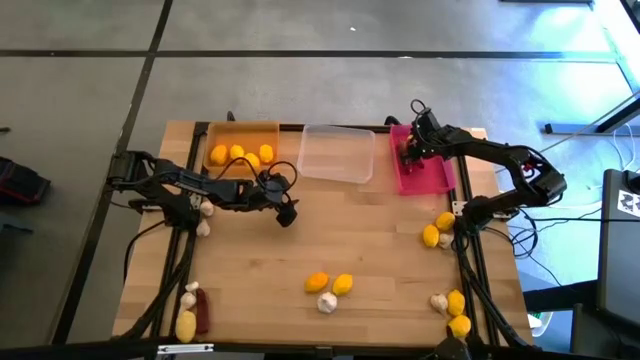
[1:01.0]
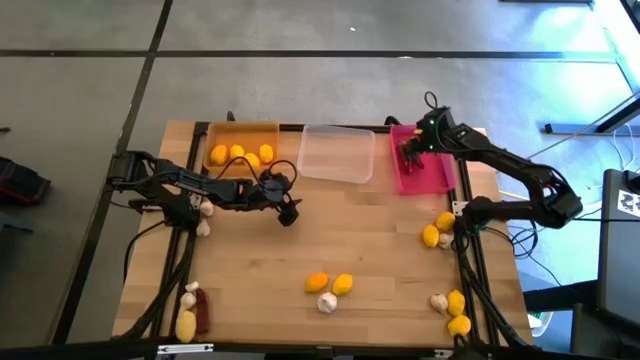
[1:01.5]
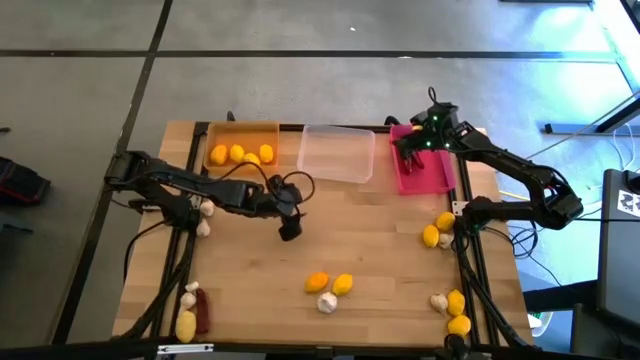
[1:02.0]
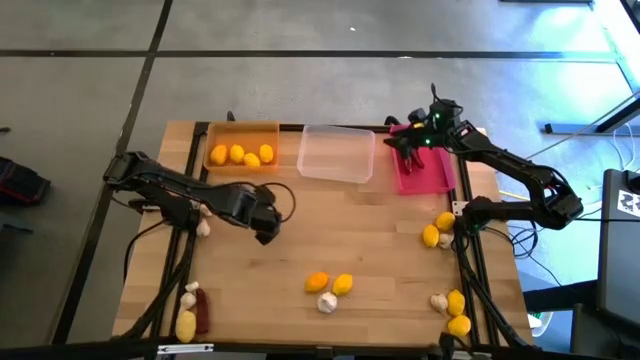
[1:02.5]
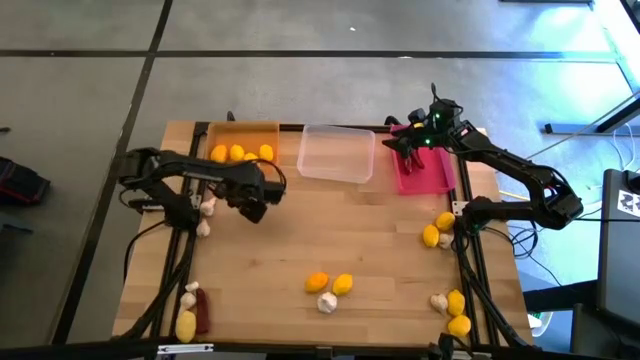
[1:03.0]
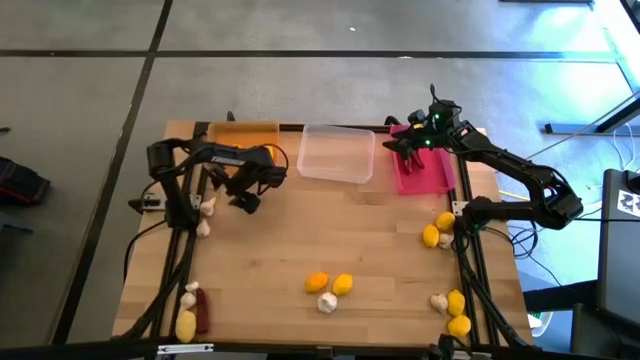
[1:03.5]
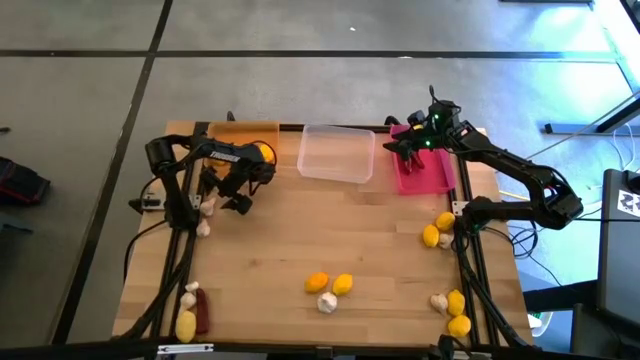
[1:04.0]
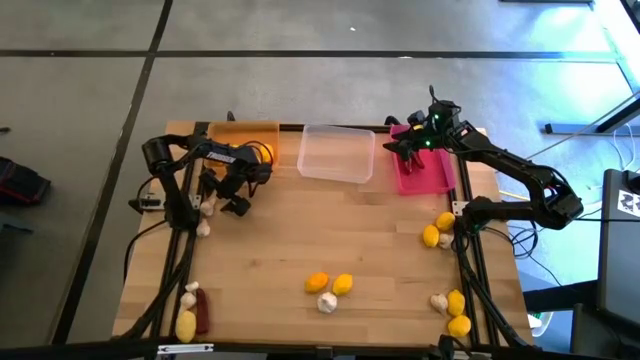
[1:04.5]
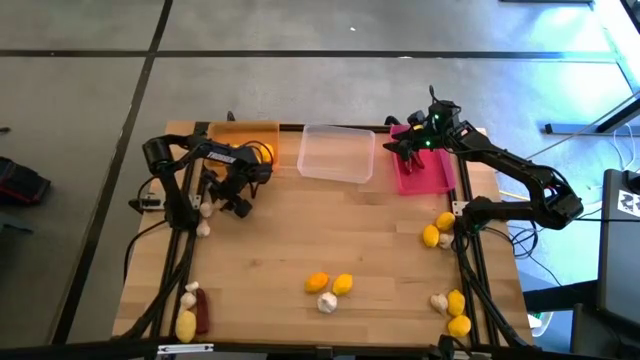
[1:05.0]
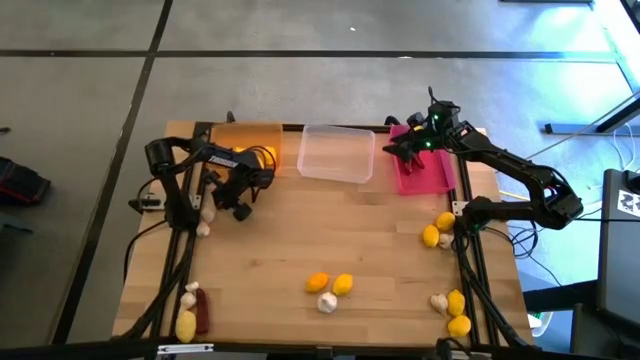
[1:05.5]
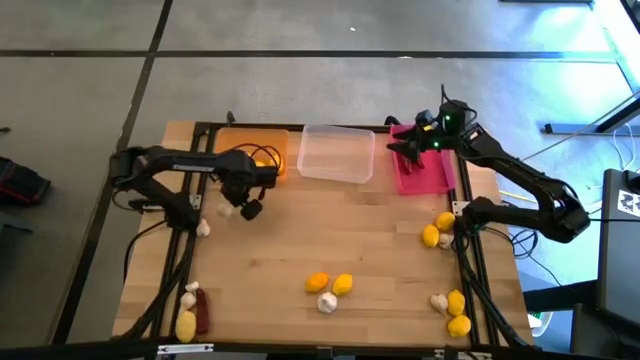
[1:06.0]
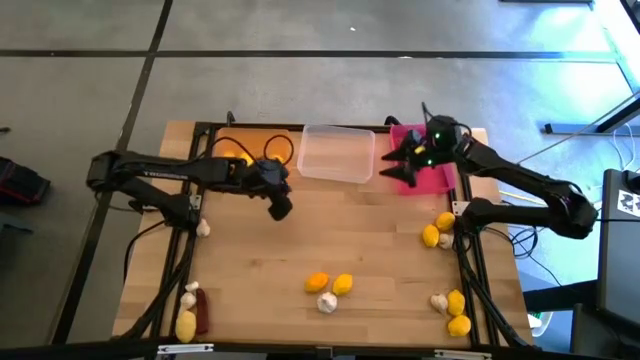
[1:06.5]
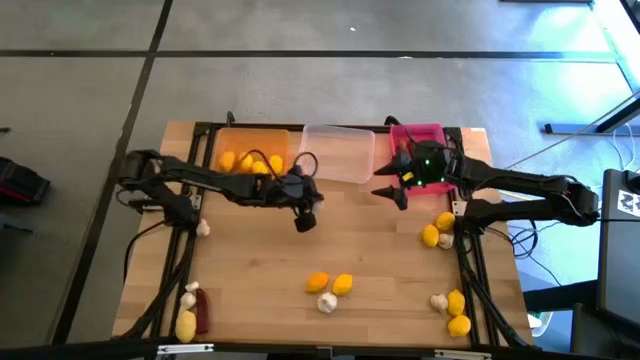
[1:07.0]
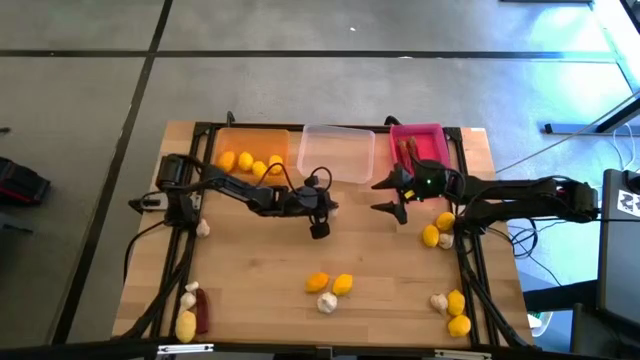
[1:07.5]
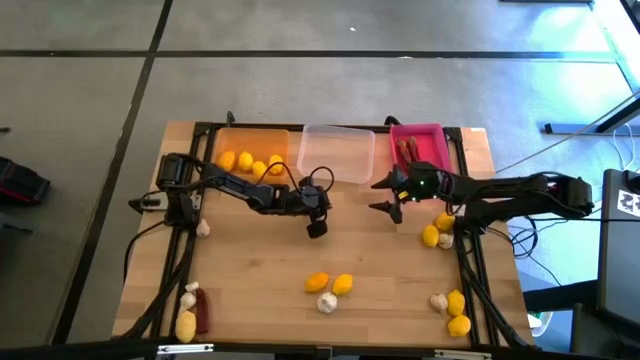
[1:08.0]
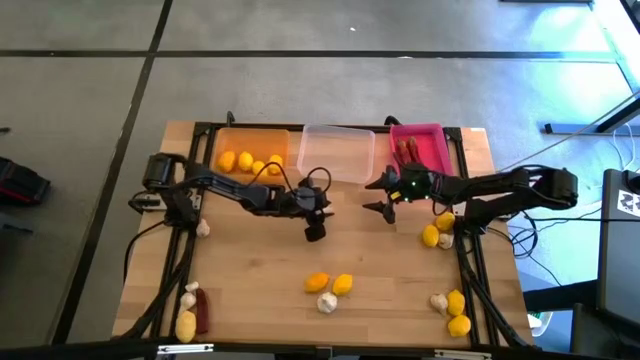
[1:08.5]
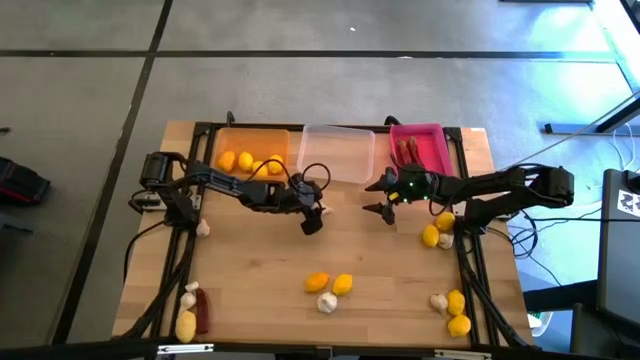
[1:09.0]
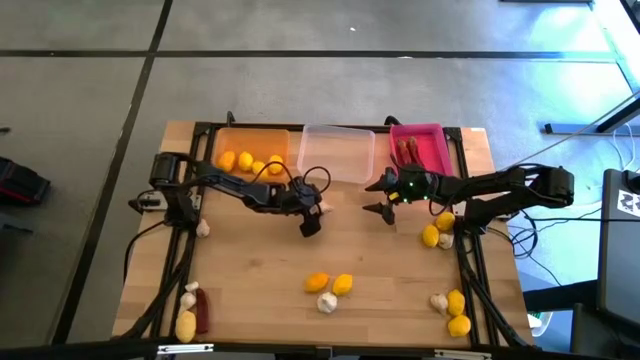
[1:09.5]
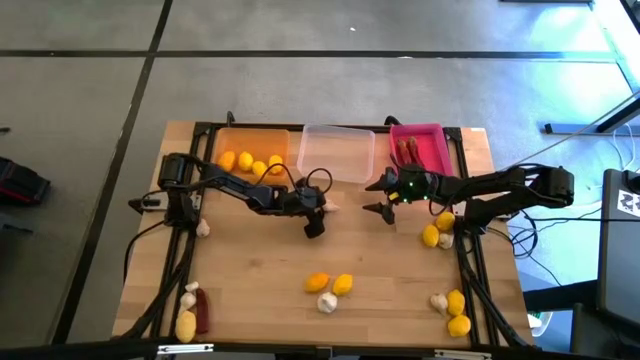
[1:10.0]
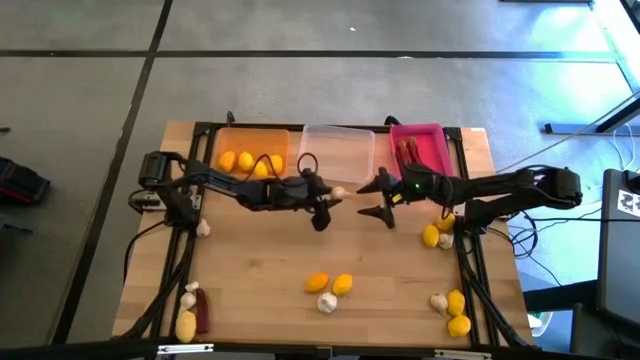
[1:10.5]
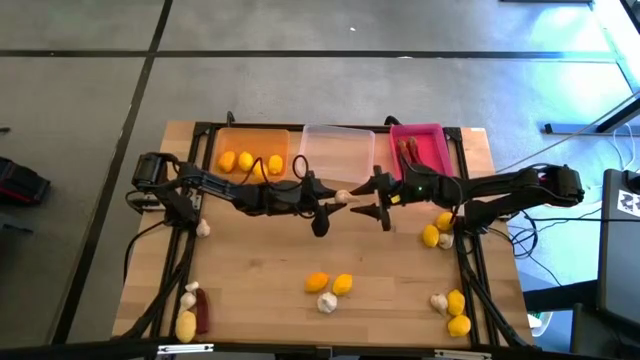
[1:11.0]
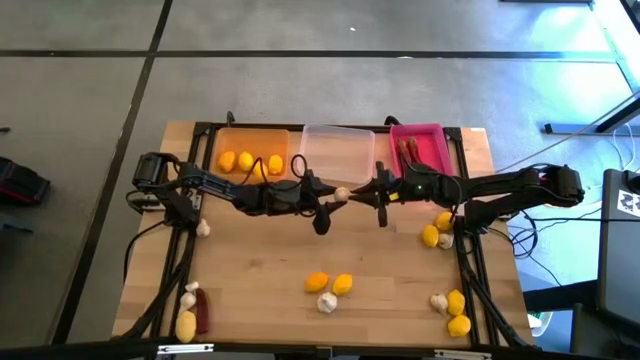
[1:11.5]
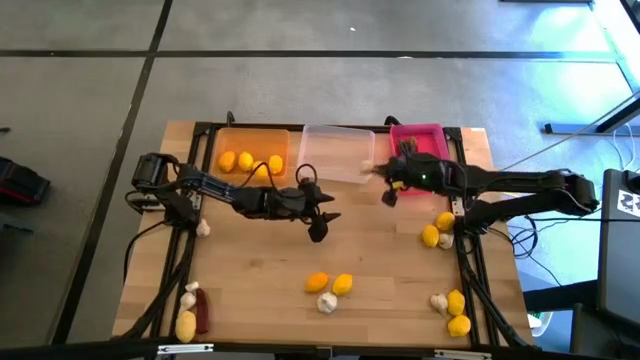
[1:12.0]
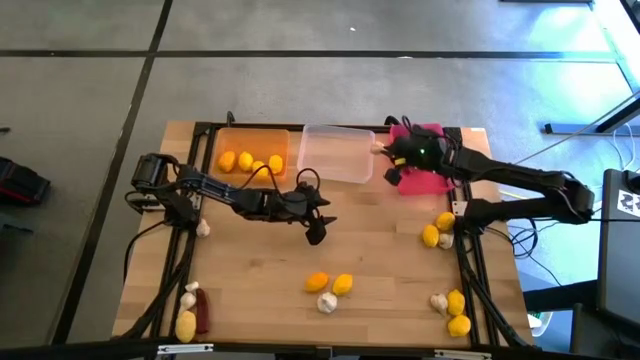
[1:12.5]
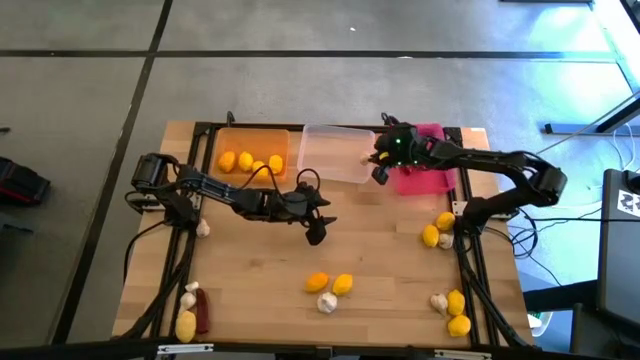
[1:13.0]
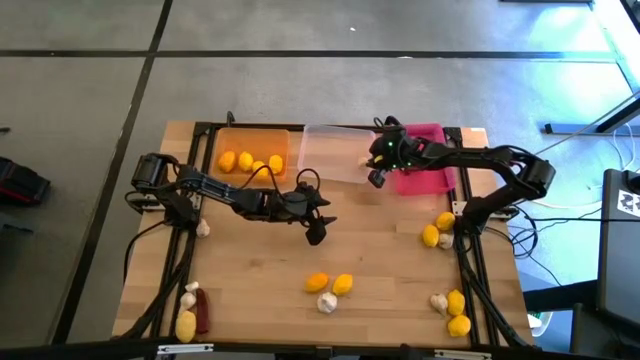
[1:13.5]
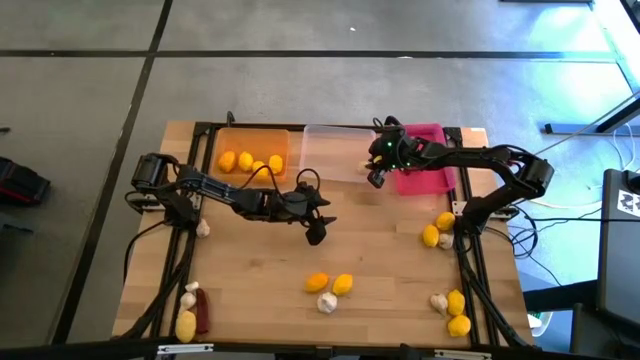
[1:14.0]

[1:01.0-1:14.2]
Task: Sort produce into baskets
Put the white garlic into the transparent bin

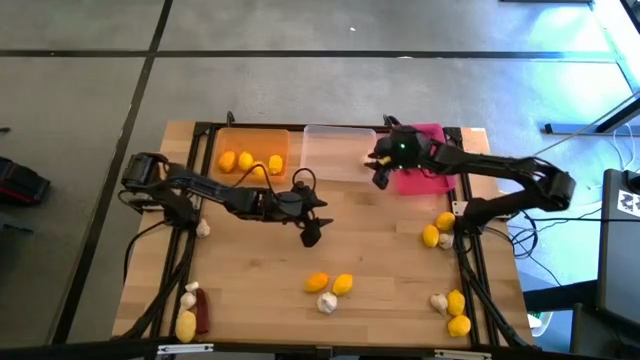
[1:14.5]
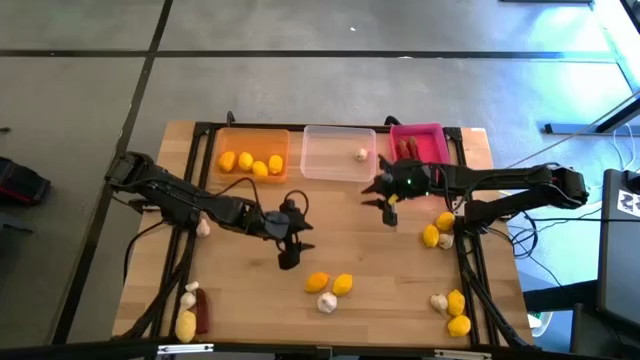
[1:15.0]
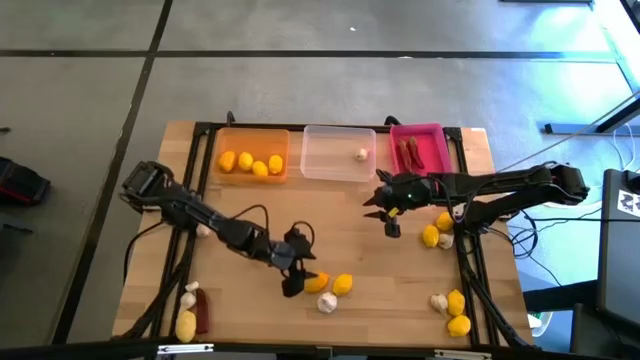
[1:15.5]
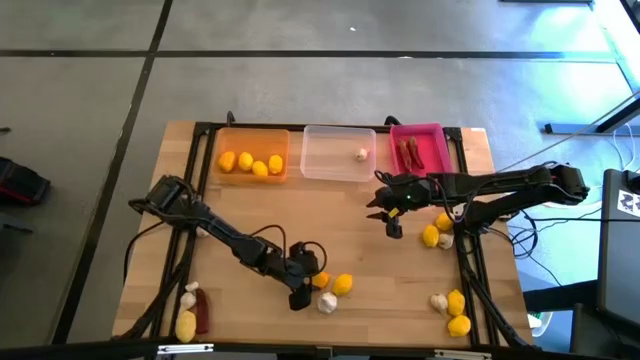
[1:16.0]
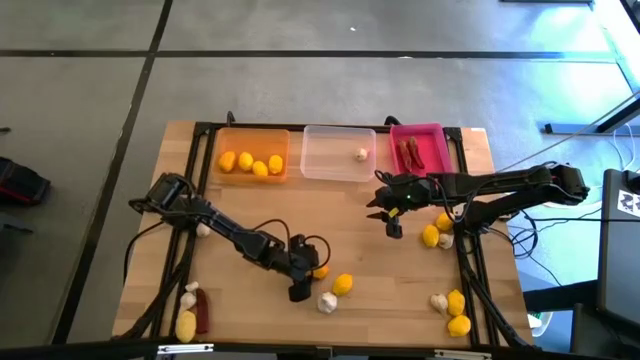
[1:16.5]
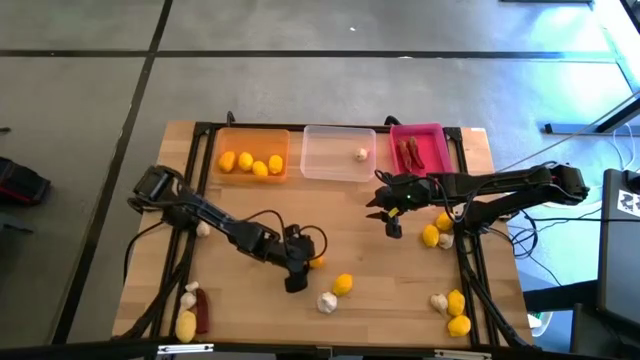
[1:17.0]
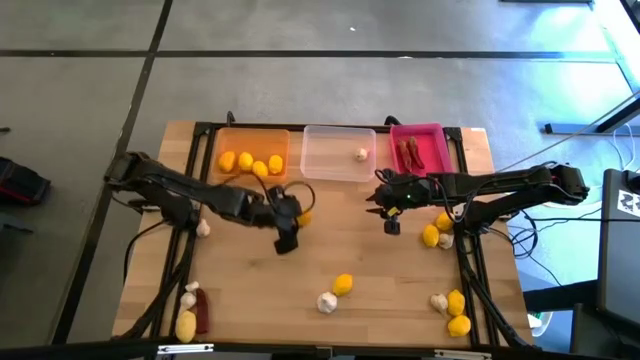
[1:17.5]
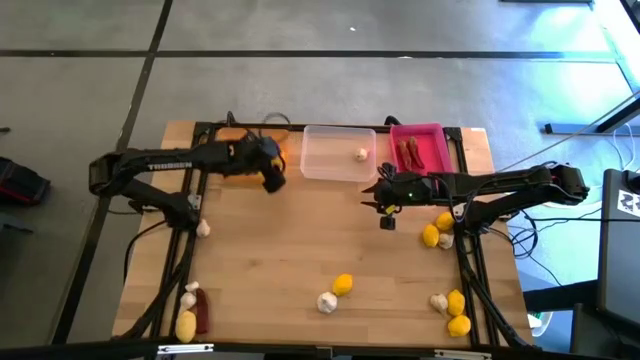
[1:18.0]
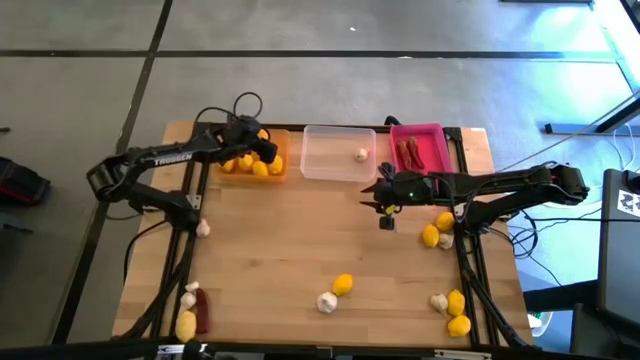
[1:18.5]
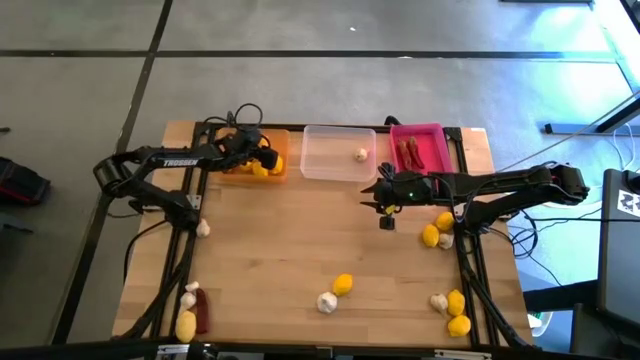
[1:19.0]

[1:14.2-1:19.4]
Put the yellow lemon into the orange bin

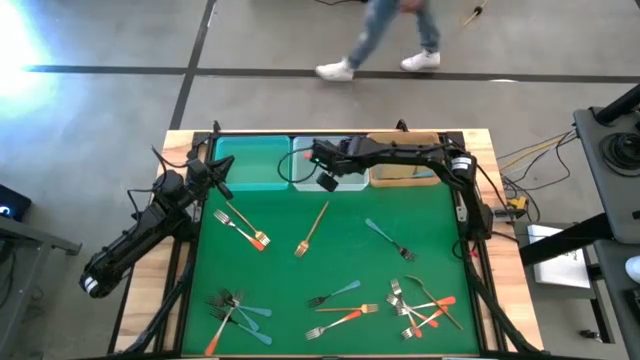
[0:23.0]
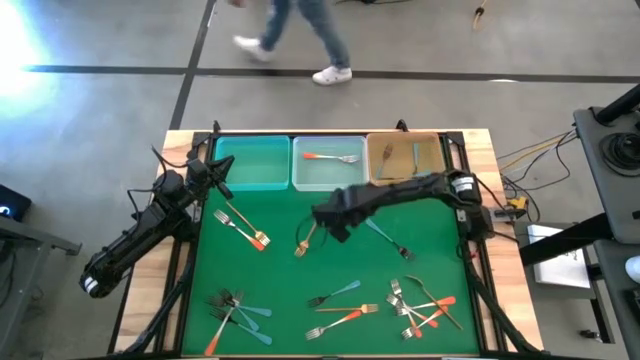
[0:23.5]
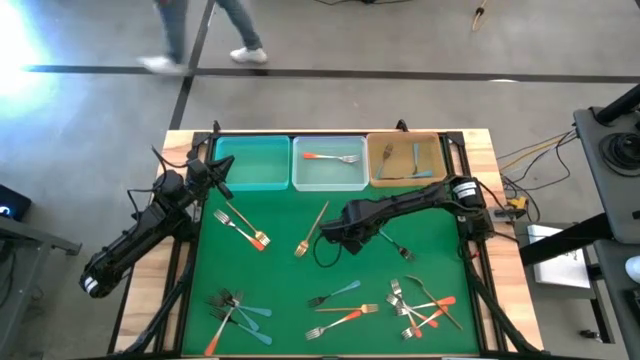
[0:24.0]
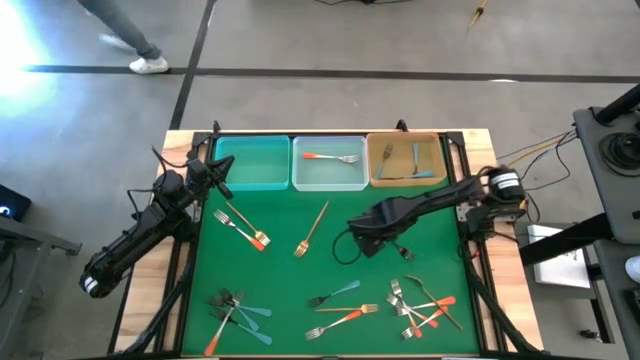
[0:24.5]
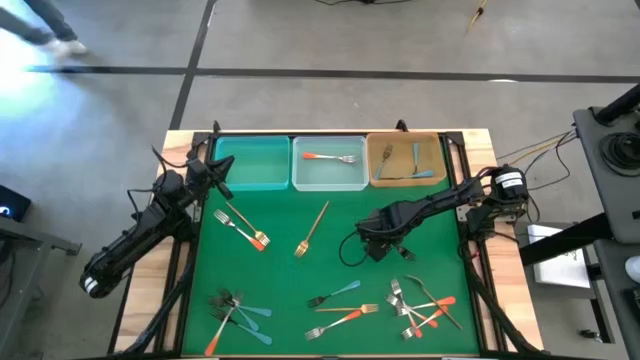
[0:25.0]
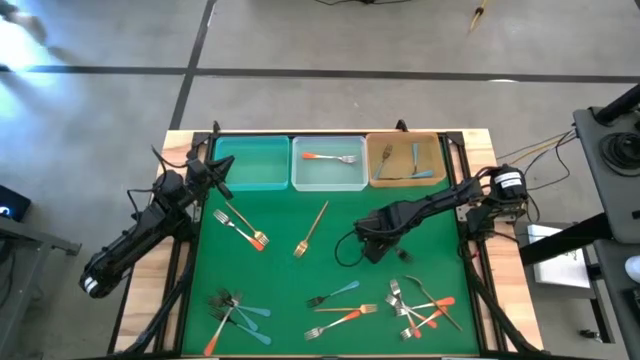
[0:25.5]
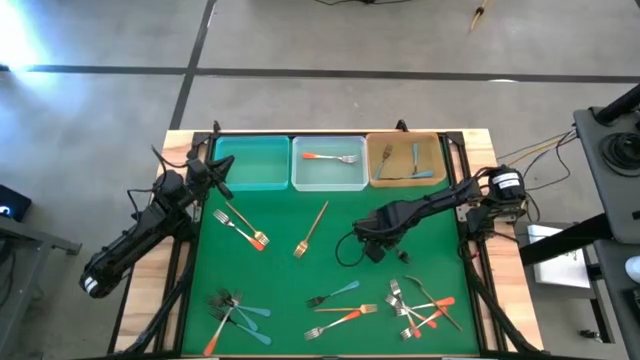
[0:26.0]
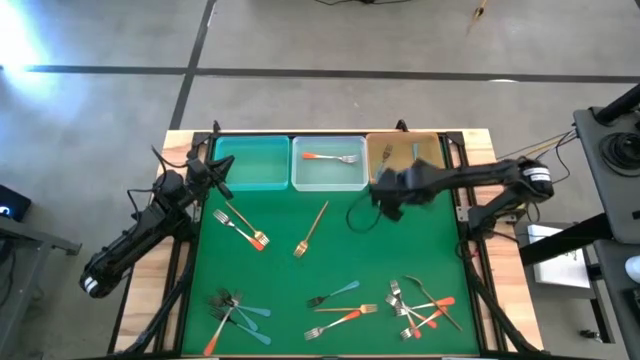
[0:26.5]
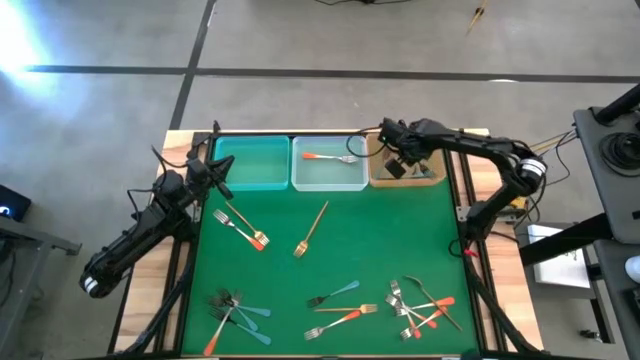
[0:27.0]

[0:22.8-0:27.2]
Task: Sort silverware by color (type)
Put the blue fork into the orange bin
